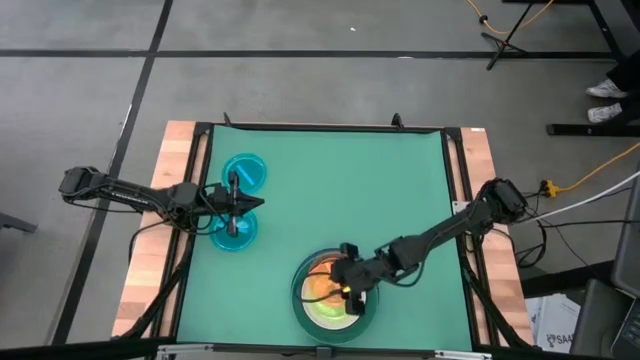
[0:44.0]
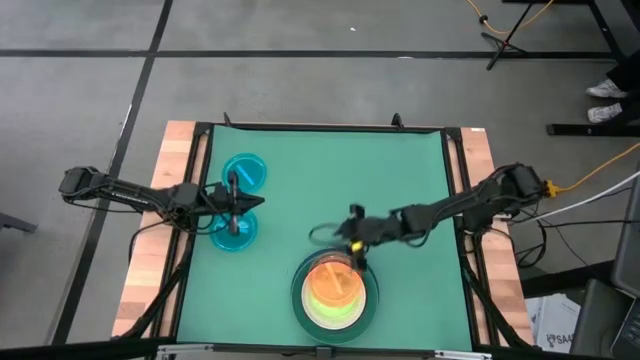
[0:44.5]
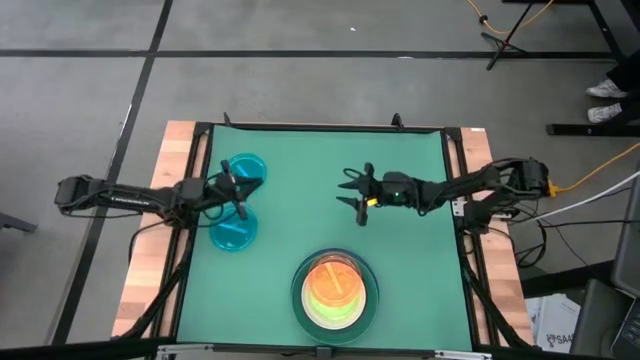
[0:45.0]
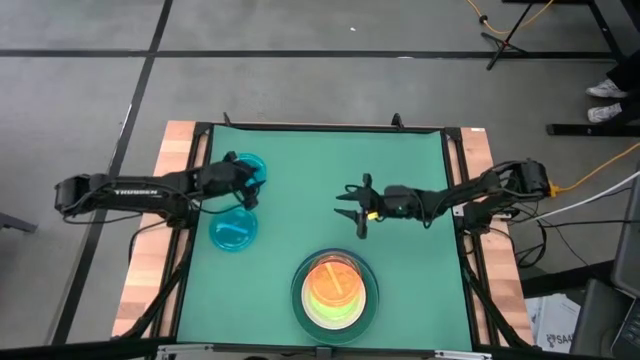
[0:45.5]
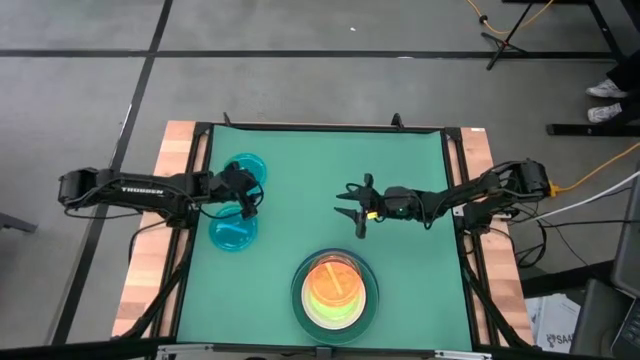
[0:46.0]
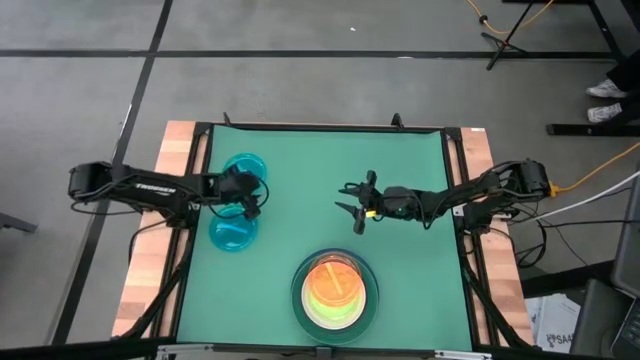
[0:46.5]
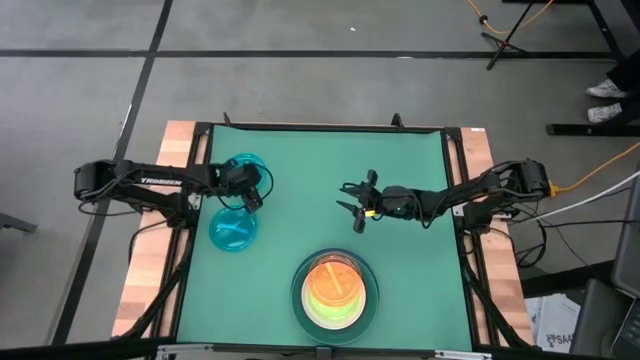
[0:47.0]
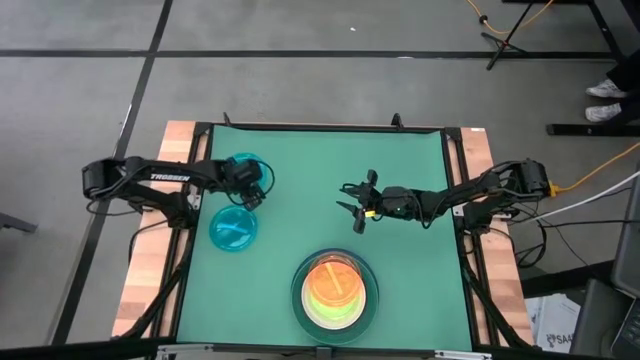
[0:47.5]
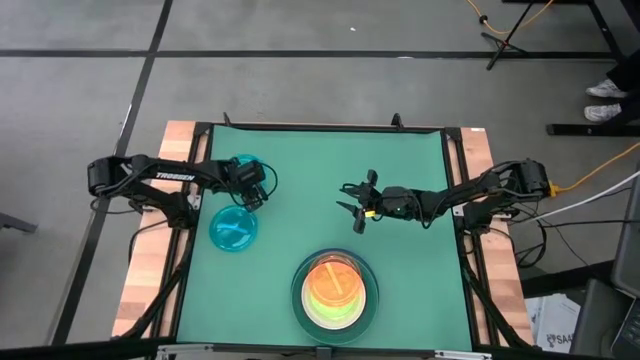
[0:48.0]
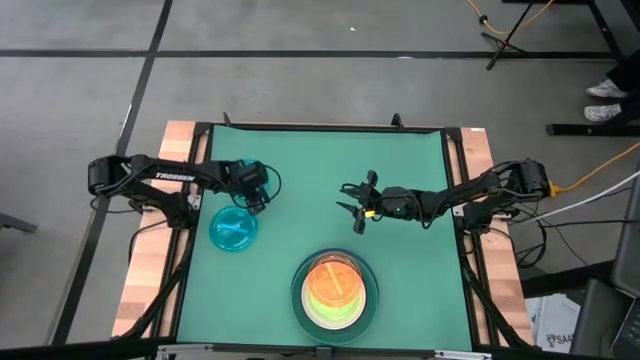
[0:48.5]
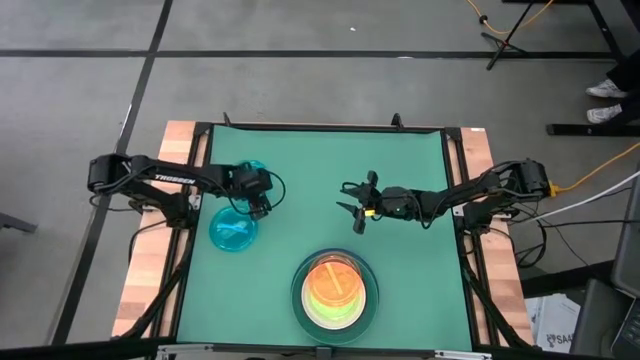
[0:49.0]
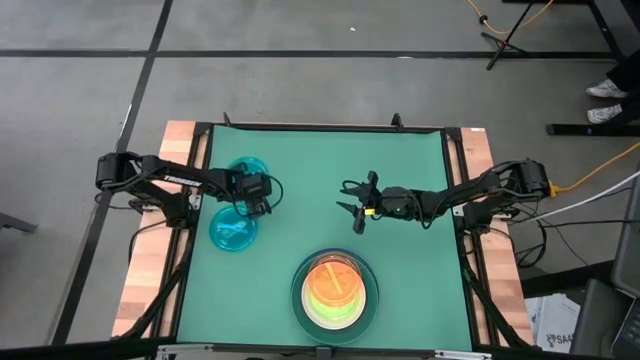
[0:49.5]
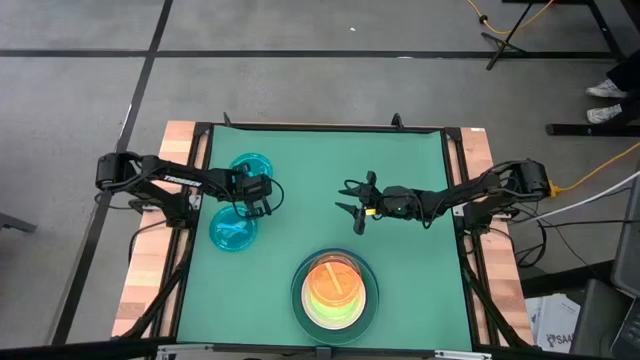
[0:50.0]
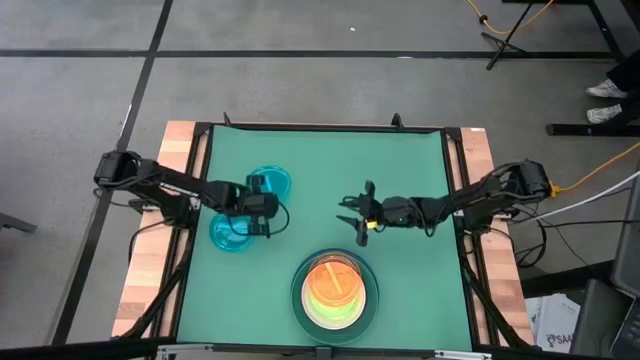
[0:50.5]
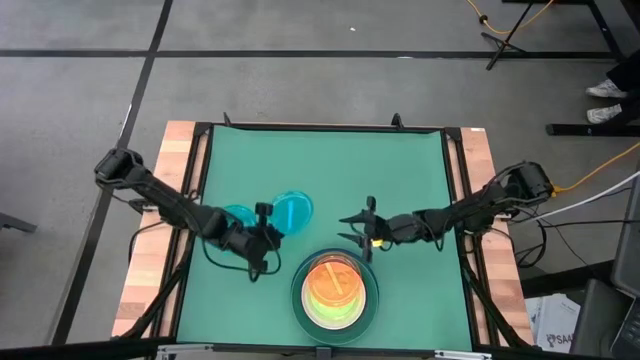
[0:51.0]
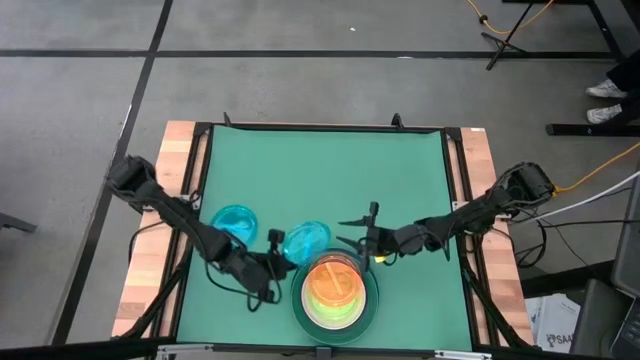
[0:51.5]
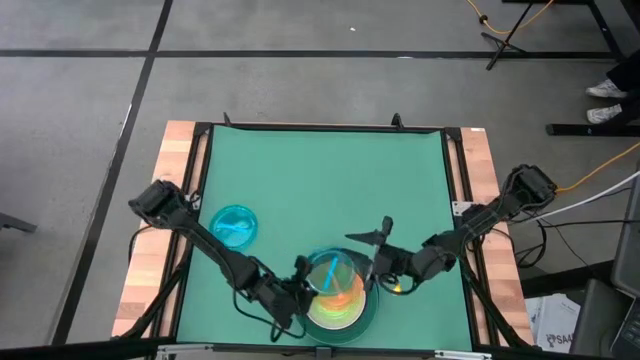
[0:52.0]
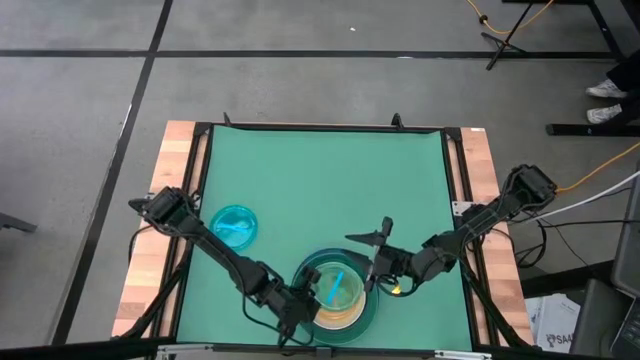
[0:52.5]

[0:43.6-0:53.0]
Task: Stack plastic plates
Stack the blue plate on top of the orange plate

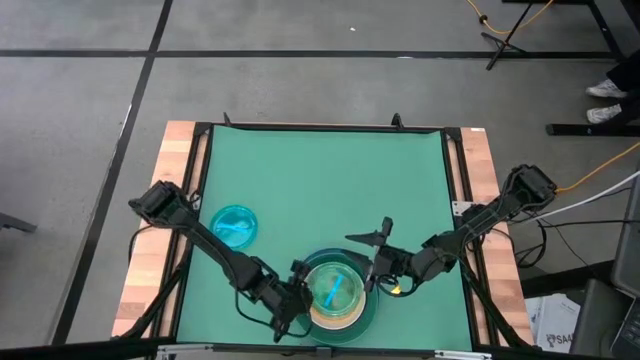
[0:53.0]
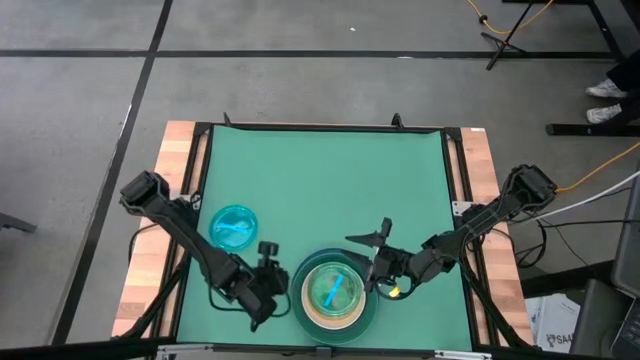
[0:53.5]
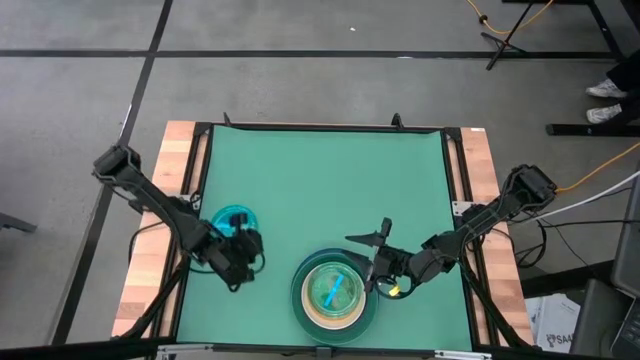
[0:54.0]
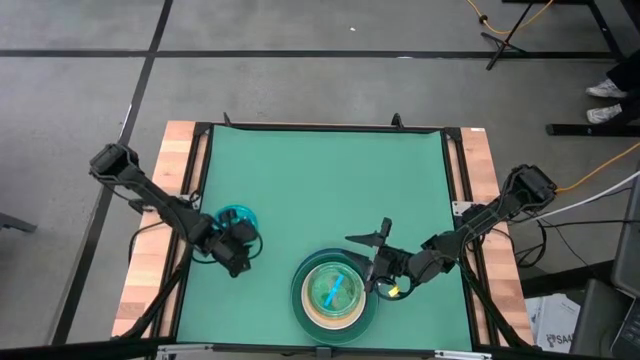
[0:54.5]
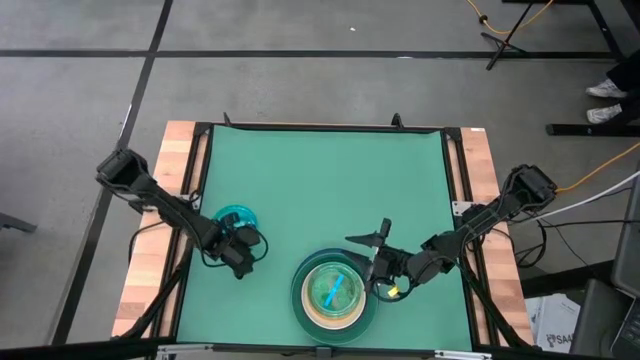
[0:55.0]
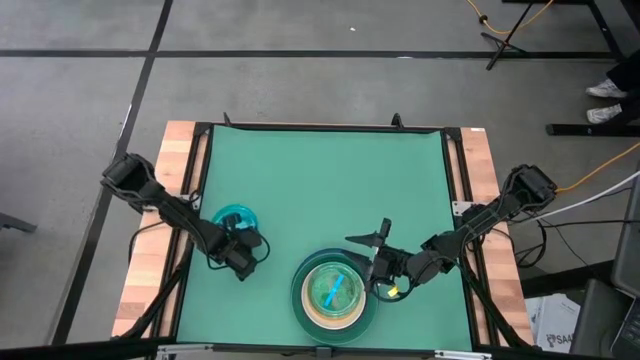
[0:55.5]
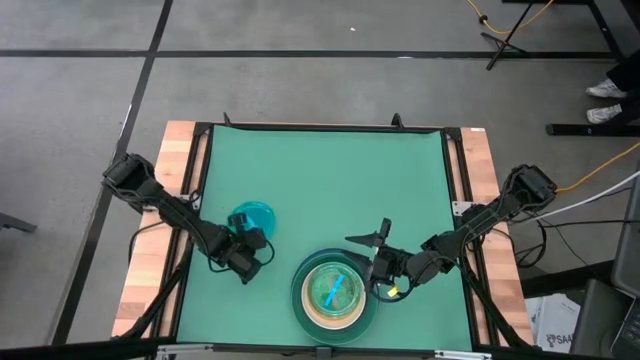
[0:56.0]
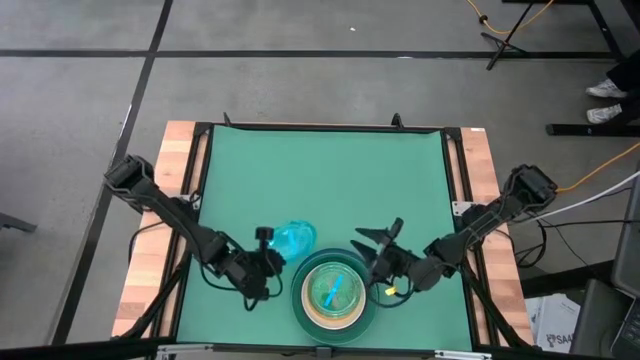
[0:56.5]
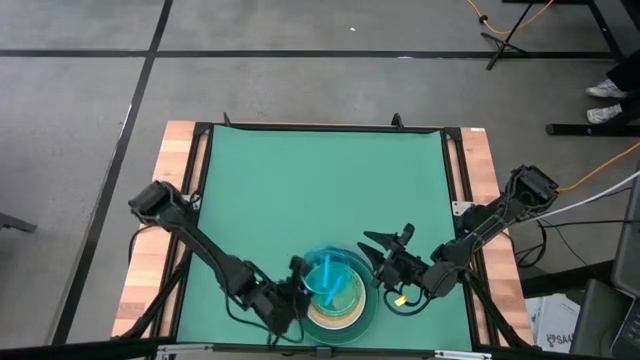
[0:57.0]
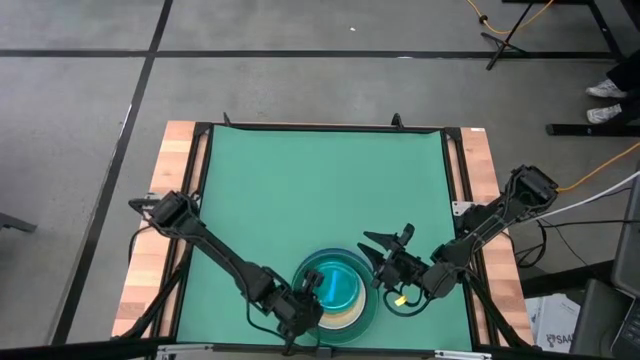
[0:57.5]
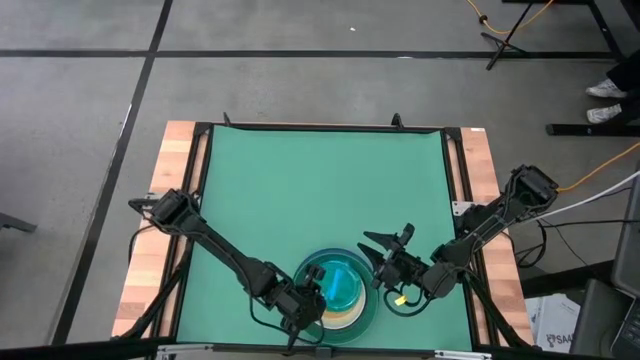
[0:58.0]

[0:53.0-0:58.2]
Stack the blue plate on top of the orange plate

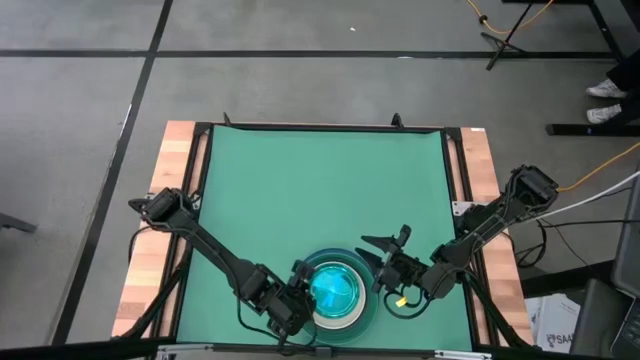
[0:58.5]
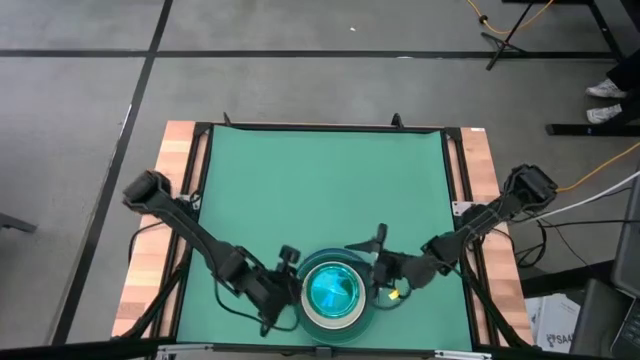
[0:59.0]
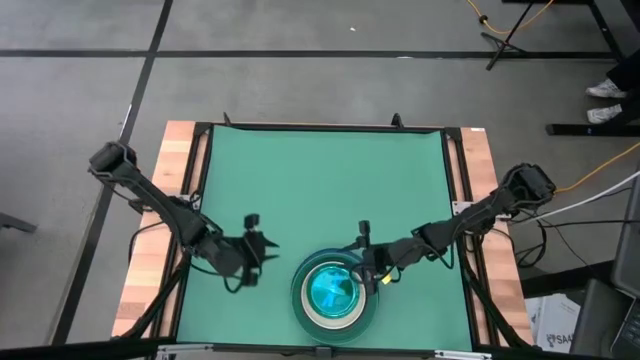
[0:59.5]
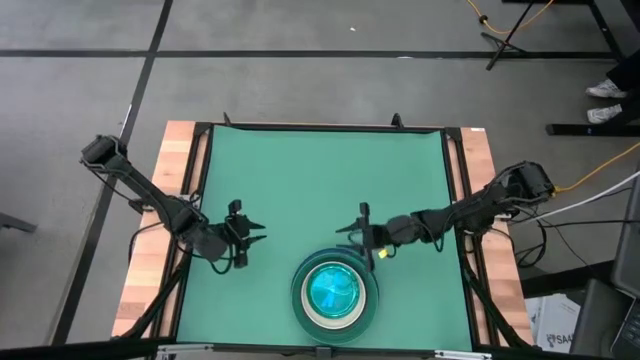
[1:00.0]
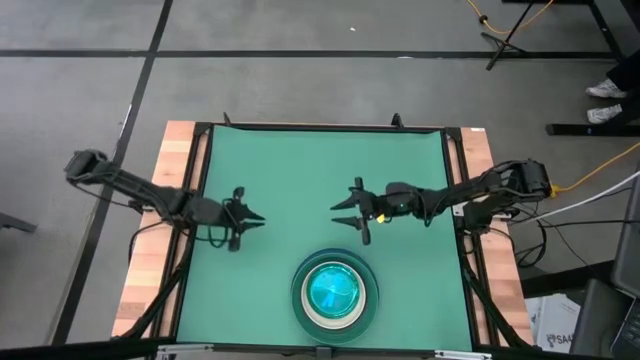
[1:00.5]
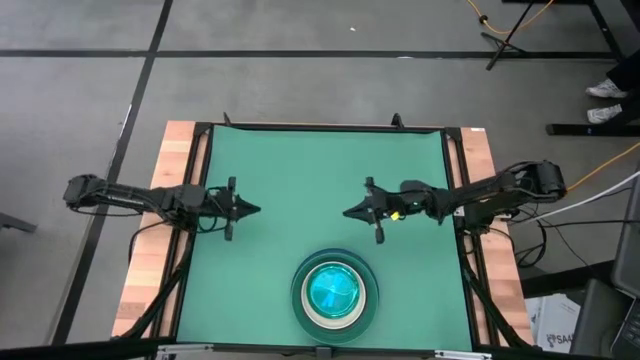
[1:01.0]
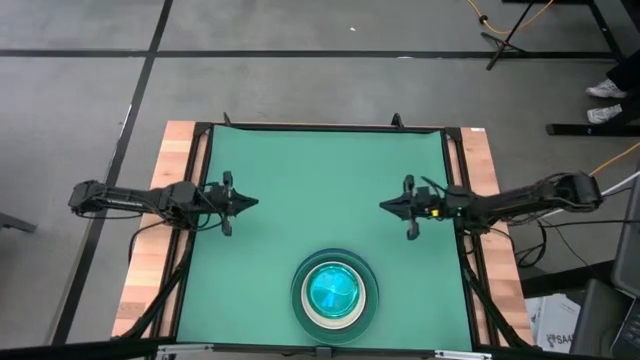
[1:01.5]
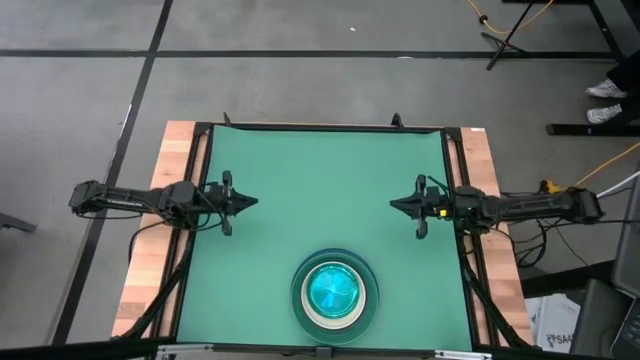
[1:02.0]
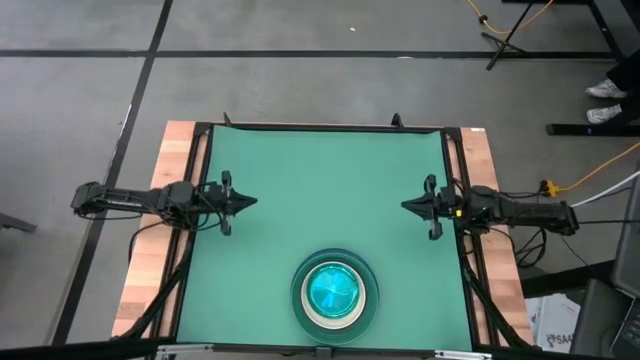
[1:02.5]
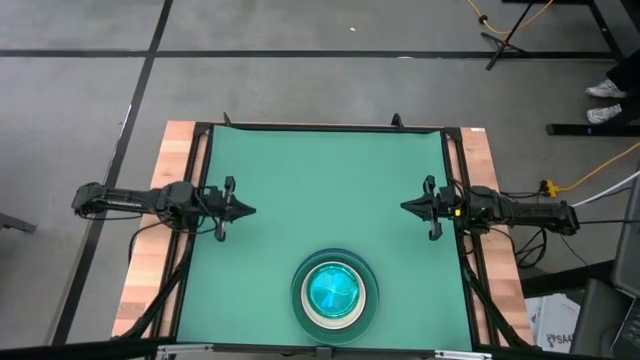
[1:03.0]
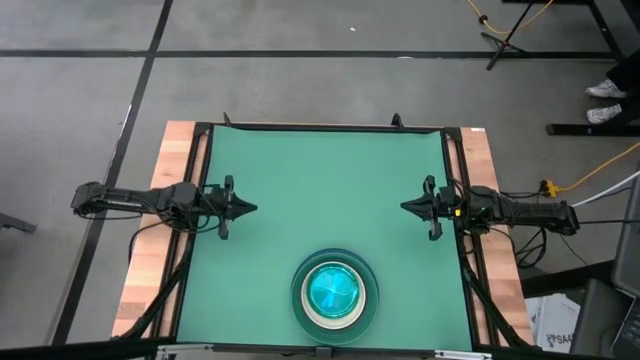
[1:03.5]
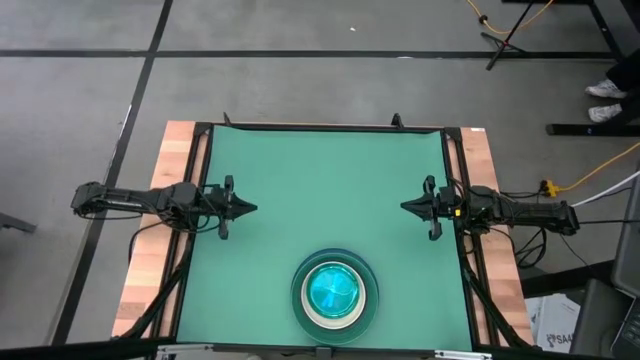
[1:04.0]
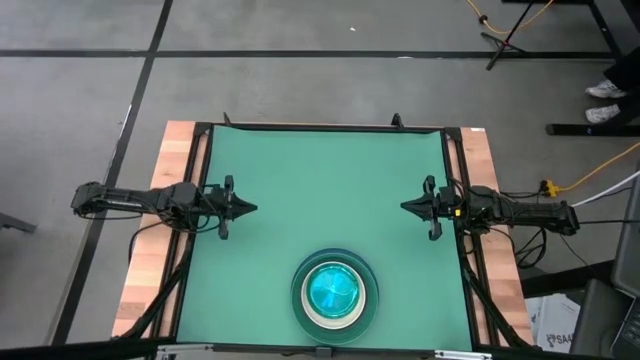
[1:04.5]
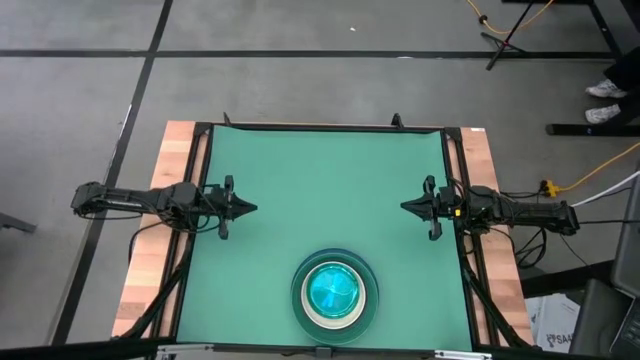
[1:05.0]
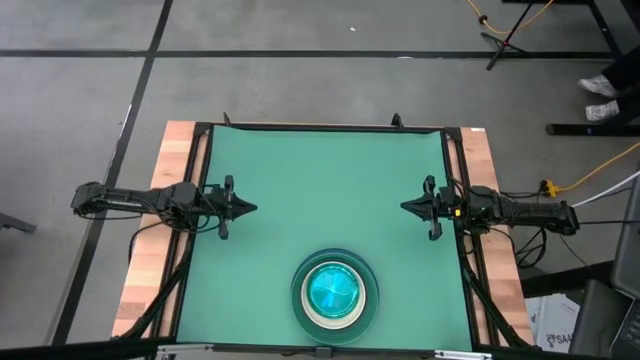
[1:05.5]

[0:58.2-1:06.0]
Return to Home Position
